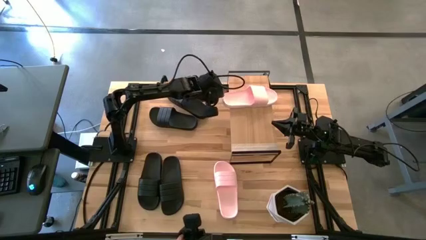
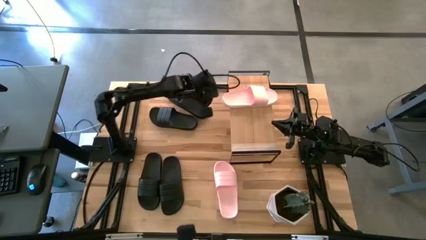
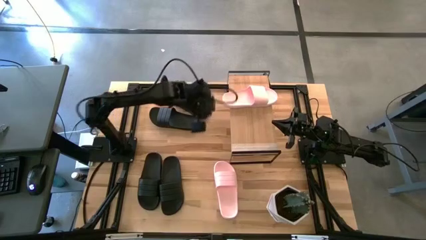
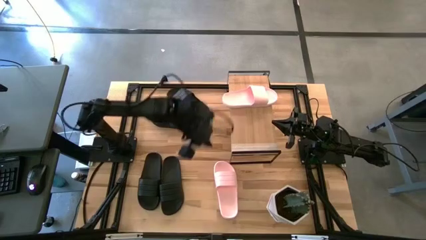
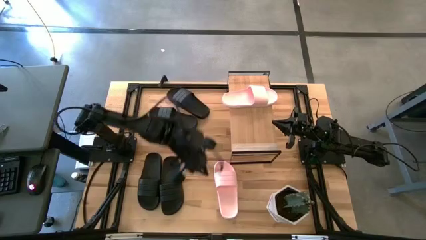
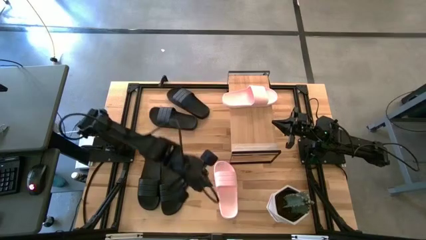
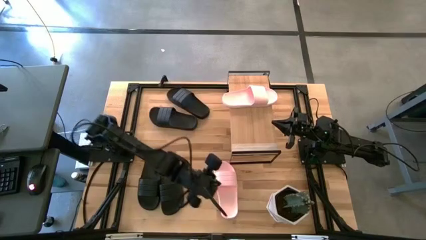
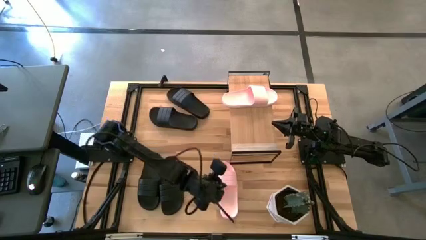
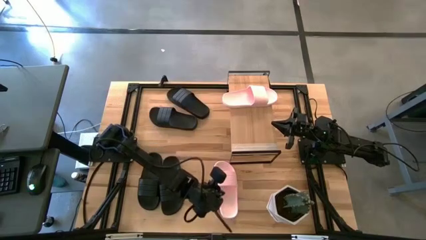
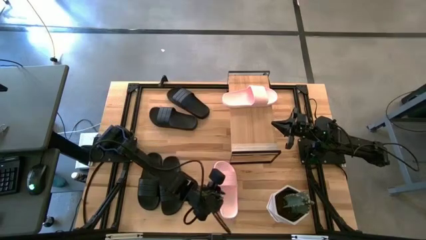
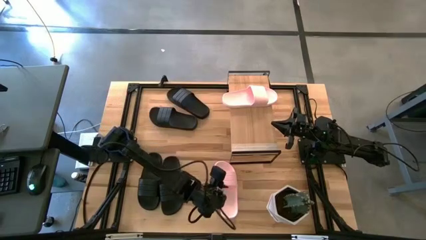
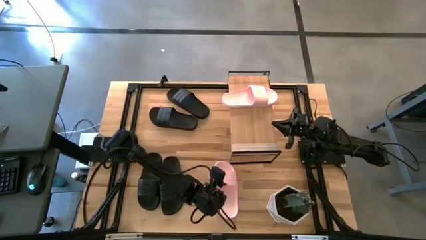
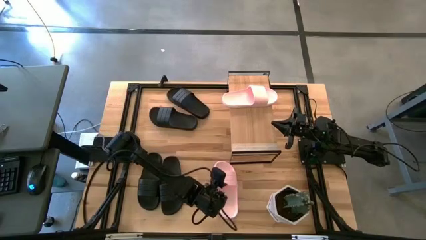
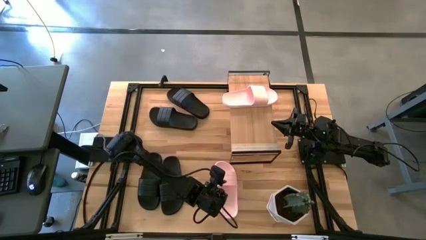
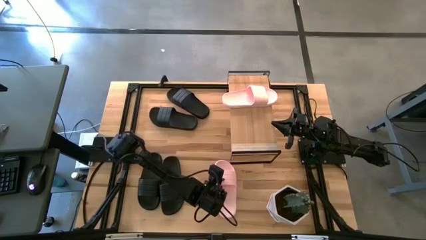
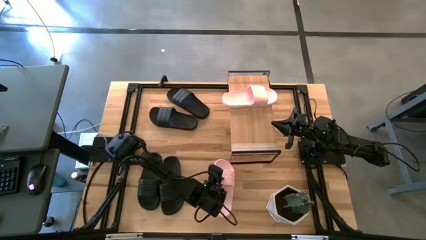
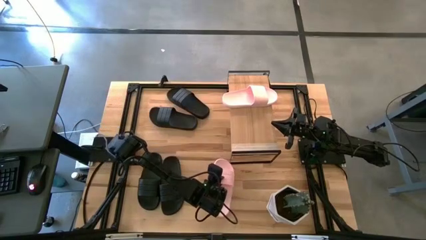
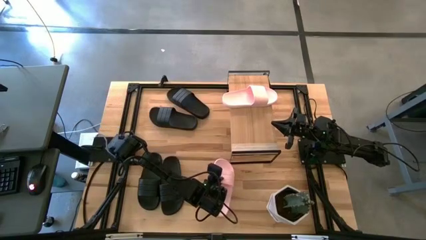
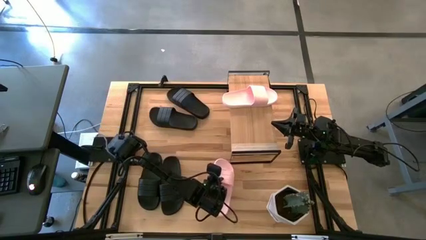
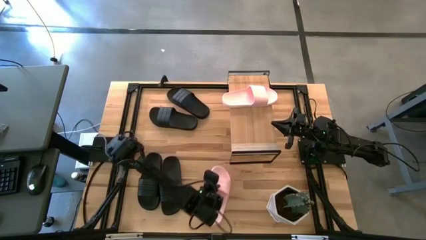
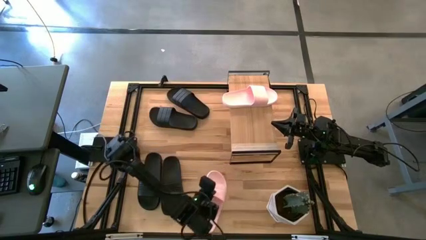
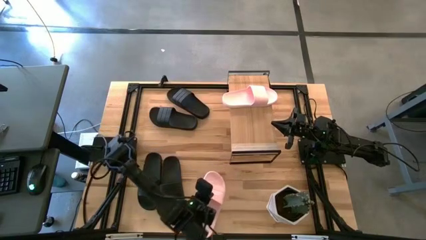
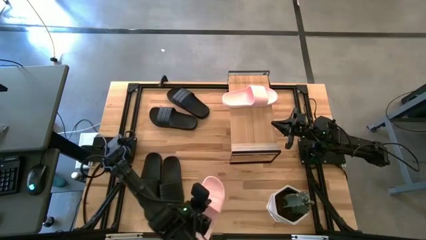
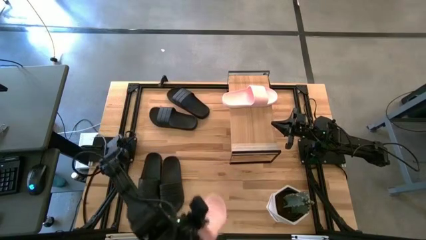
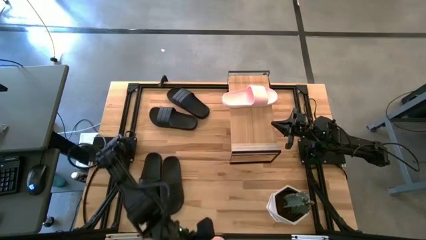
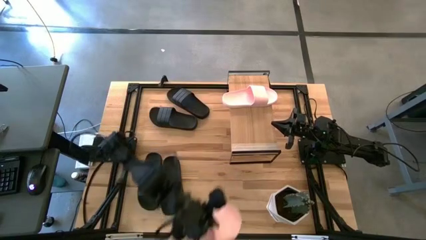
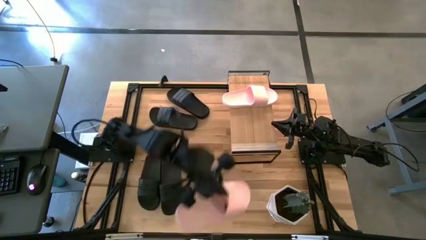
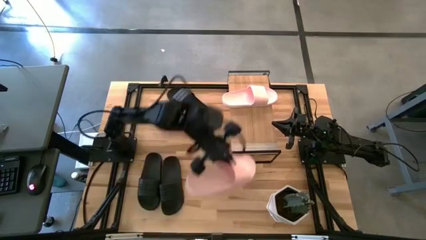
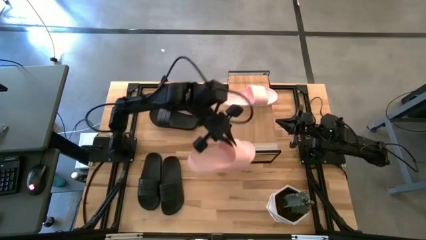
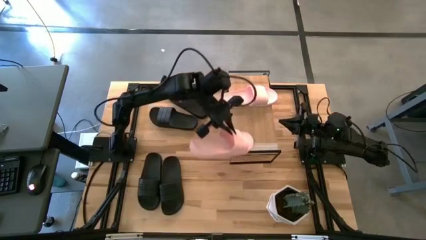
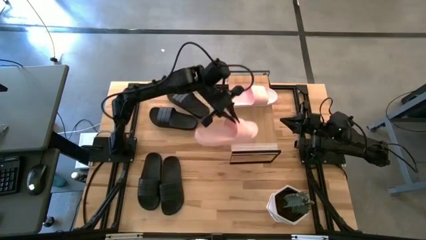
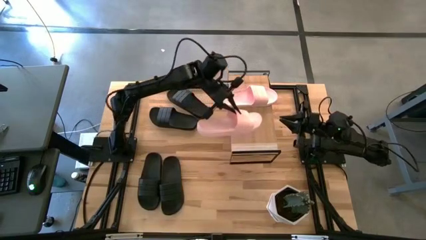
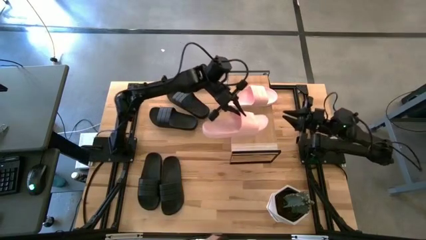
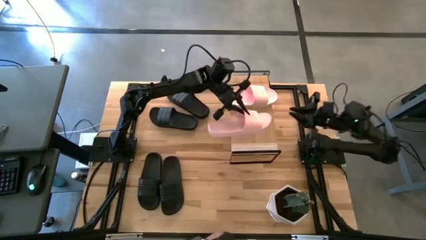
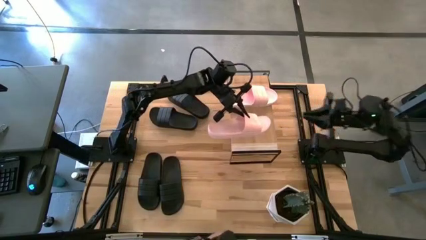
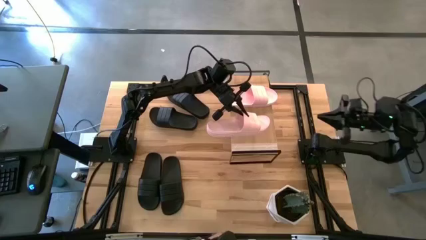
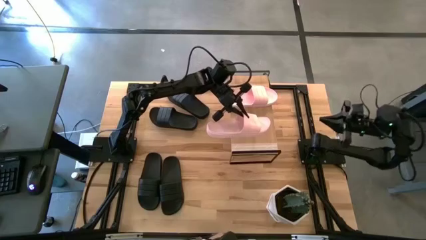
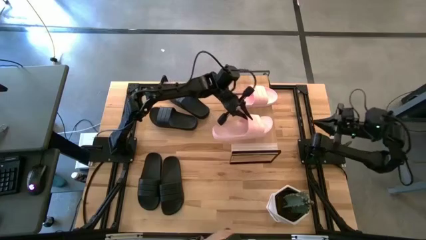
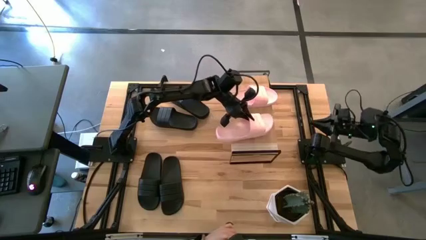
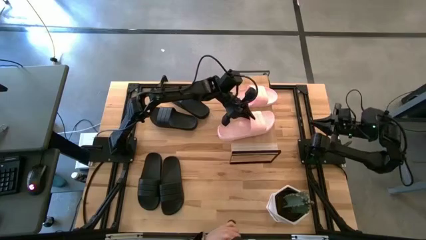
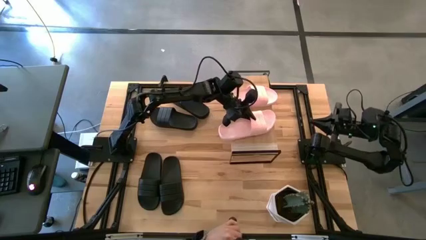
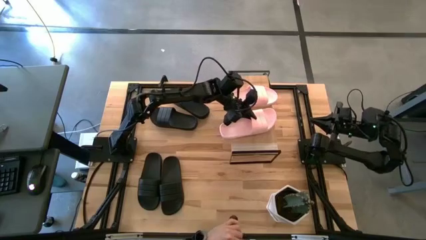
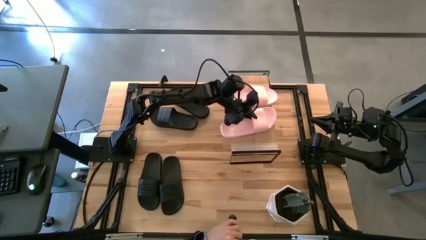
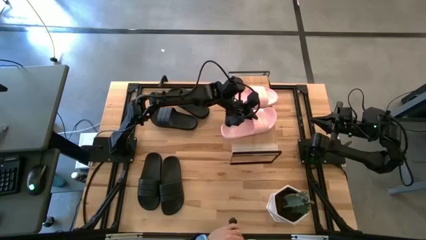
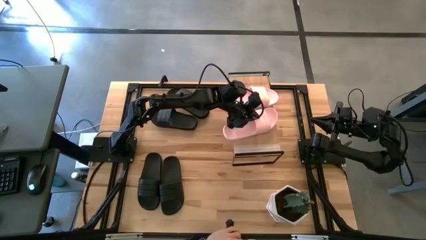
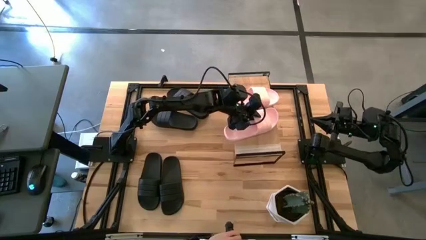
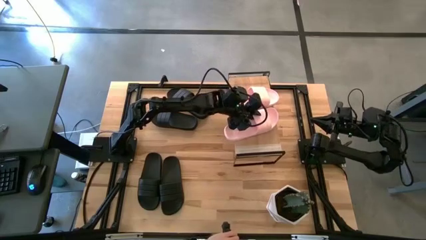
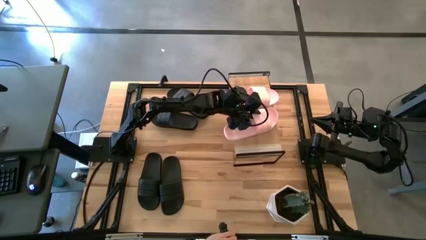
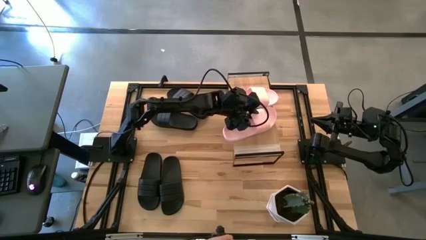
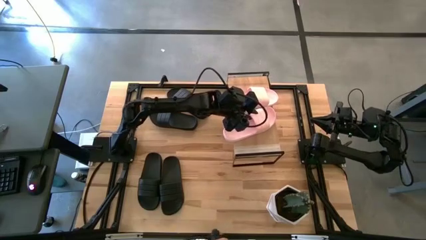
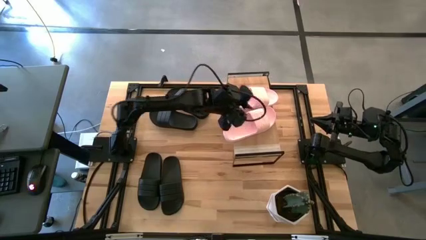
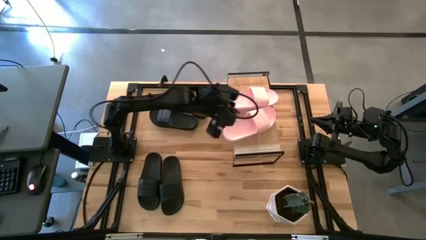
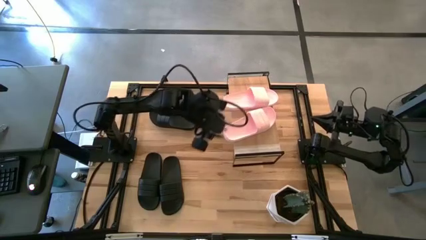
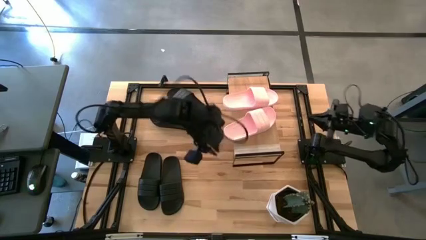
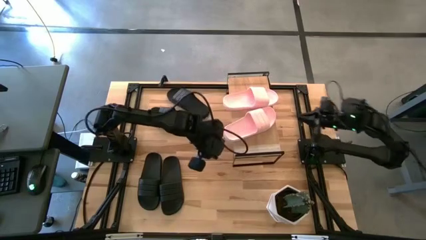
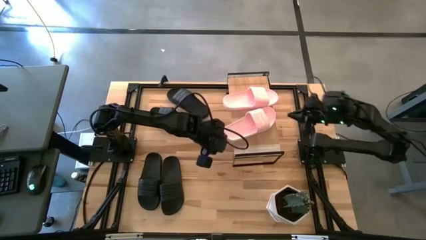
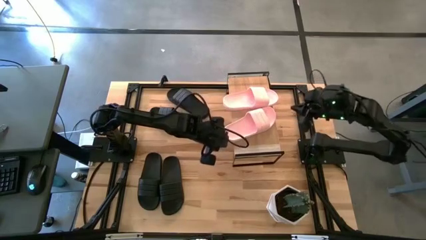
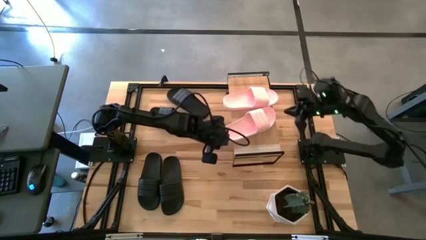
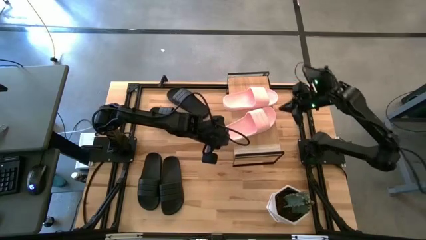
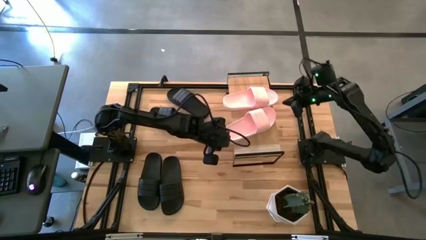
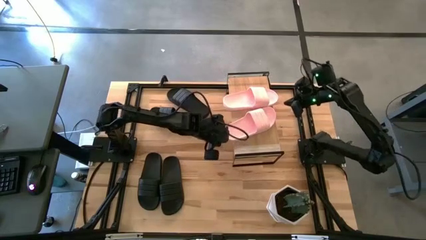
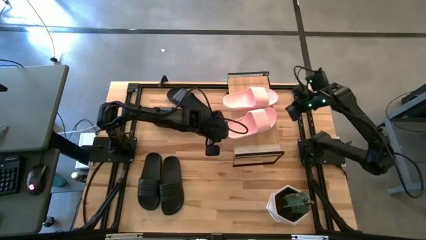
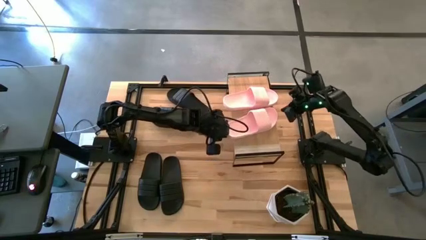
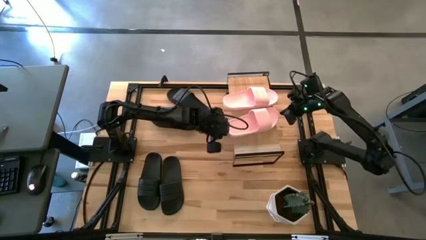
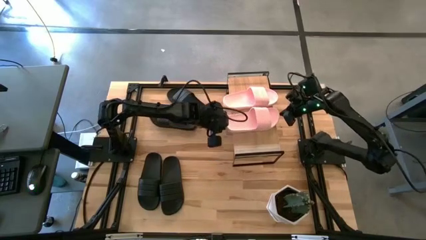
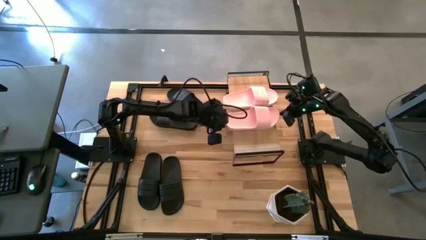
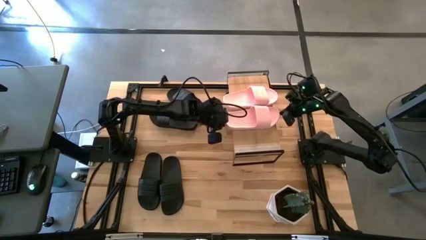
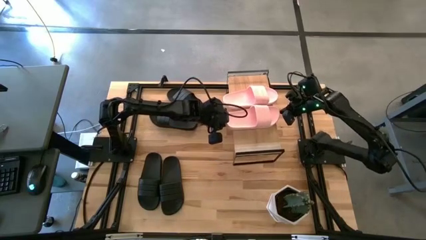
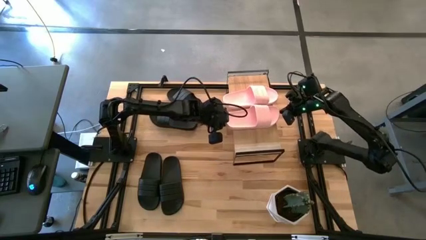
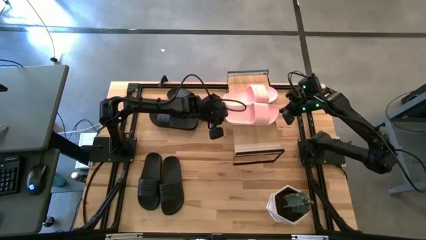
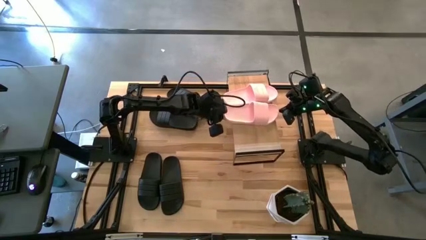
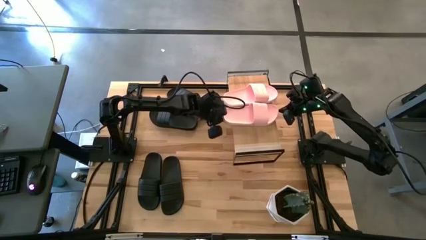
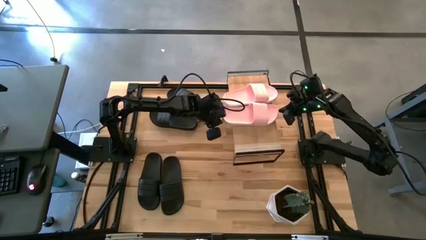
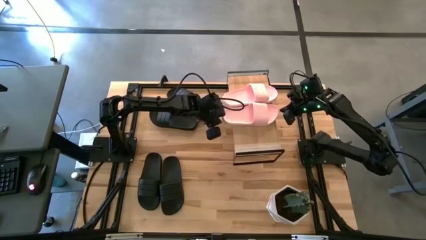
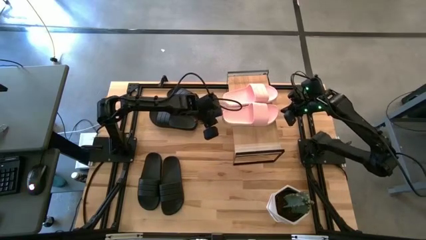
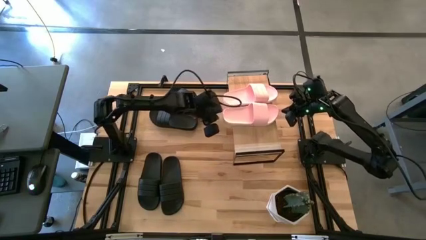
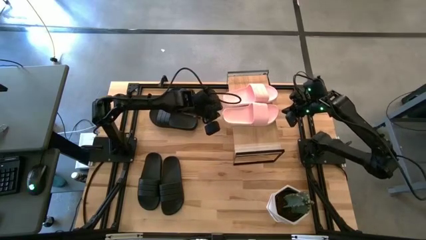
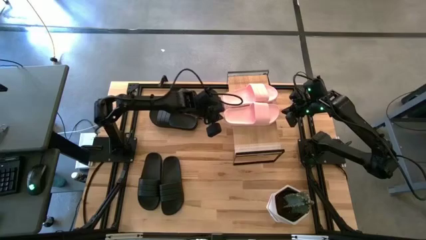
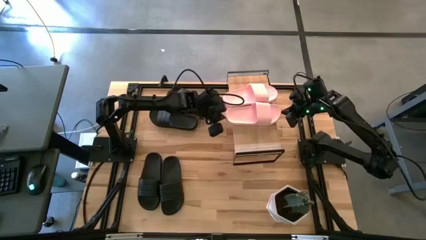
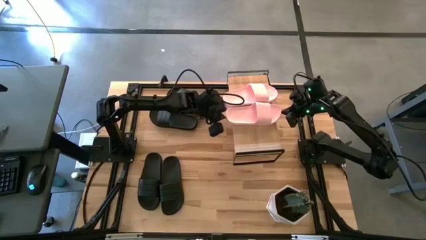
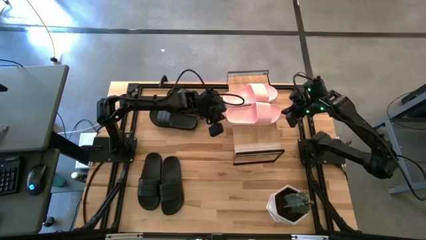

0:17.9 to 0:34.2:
Task: Pick and place slides into the shelf
Put the pink slide on the shelf

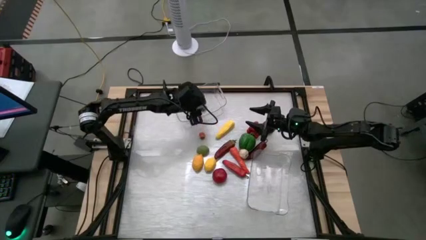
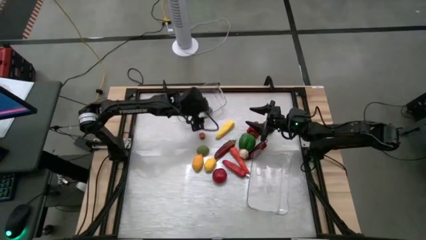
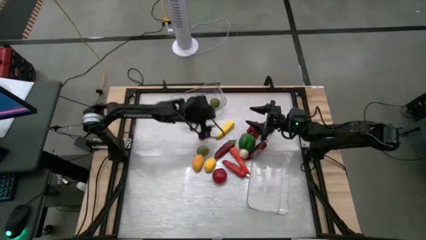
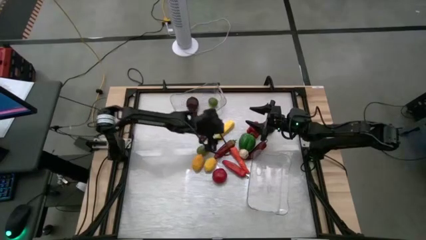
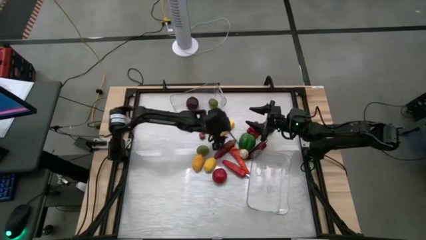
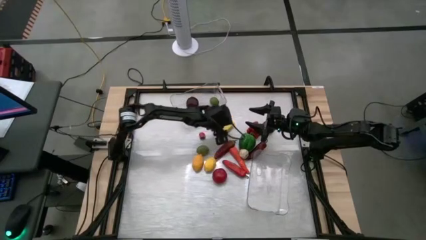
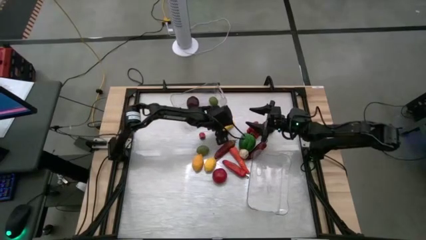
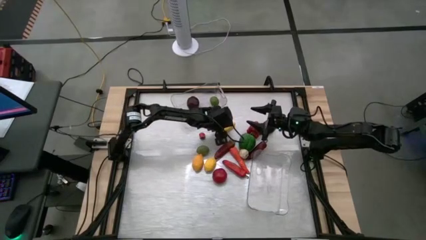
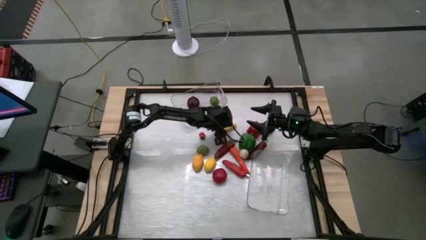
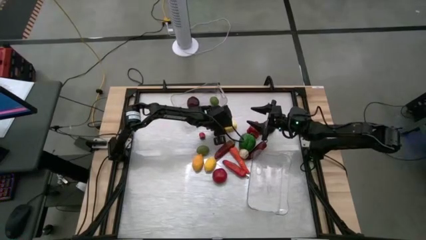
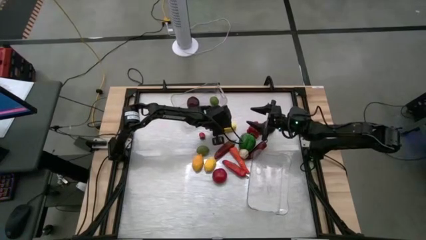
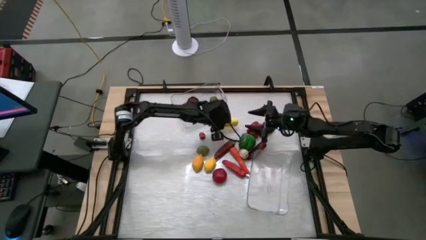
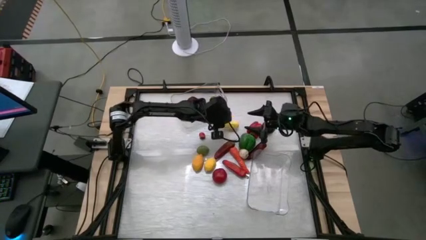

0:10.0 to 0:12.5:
Task: Sort produce into baskets
Put the yellow corn into the bottom transparent bin
